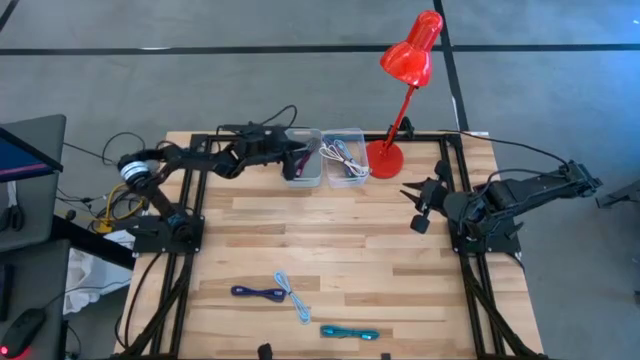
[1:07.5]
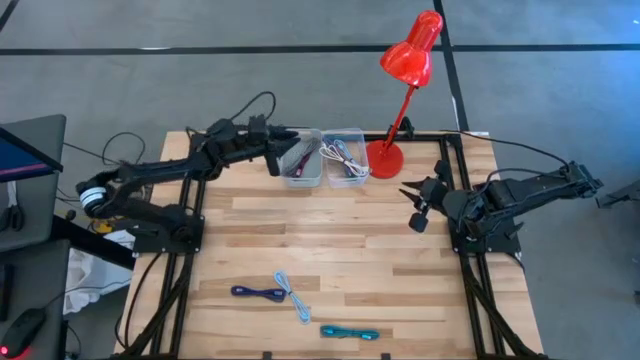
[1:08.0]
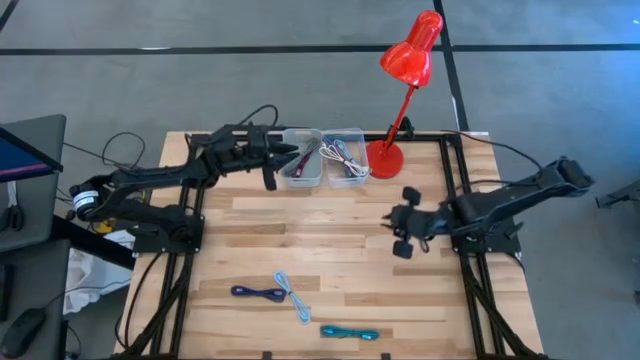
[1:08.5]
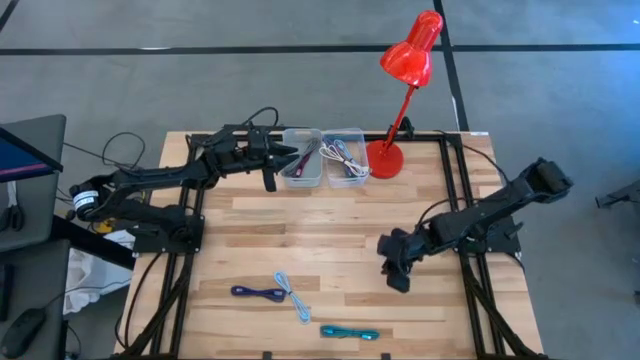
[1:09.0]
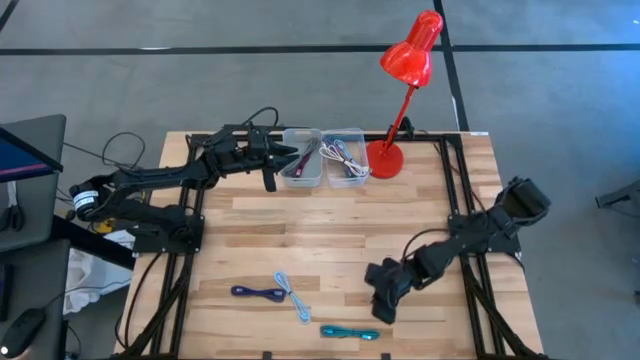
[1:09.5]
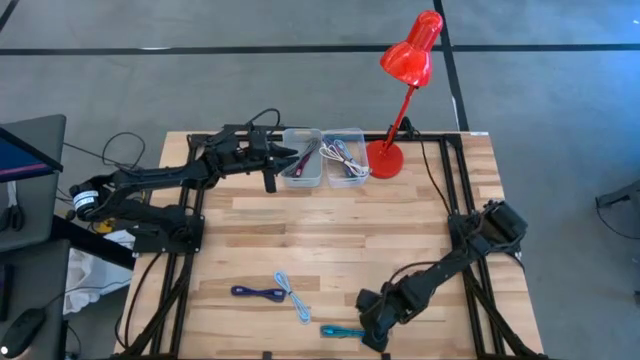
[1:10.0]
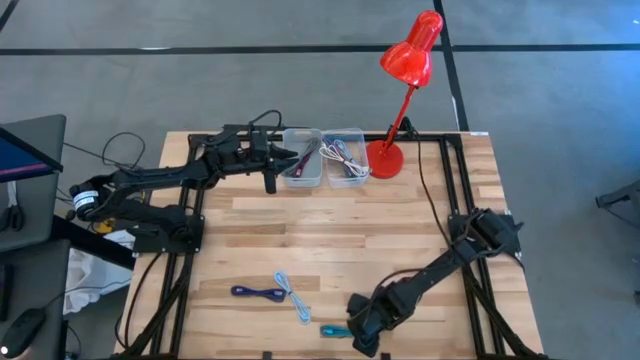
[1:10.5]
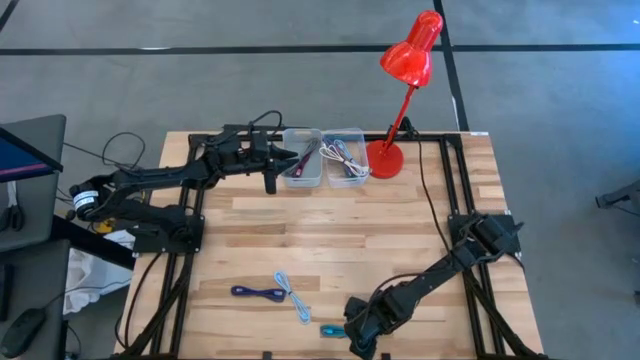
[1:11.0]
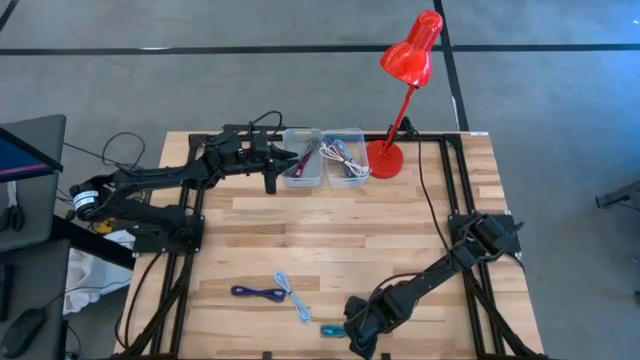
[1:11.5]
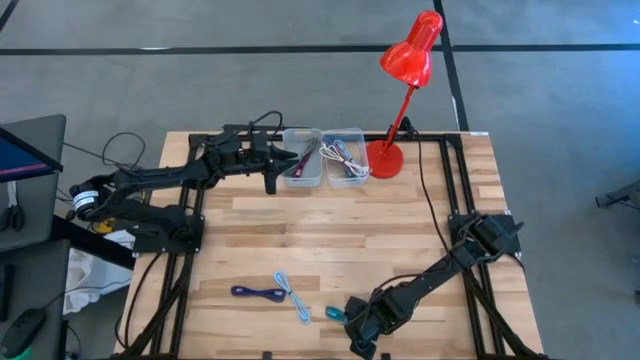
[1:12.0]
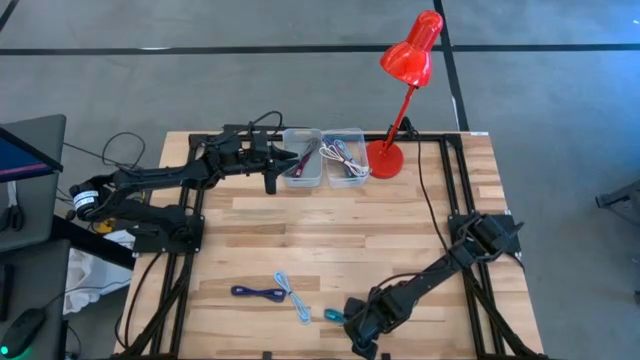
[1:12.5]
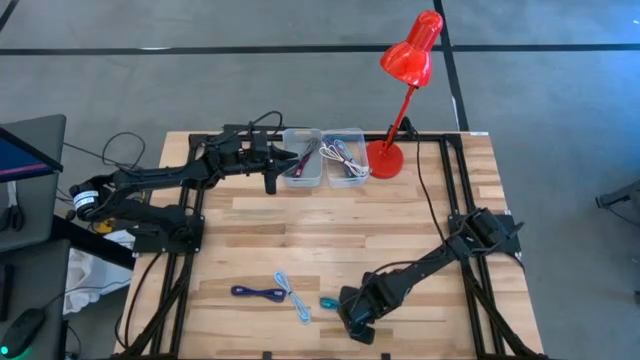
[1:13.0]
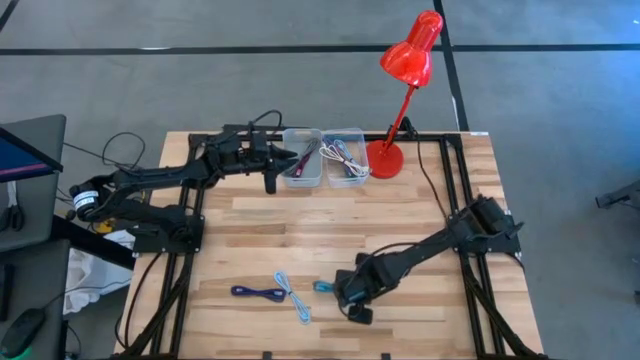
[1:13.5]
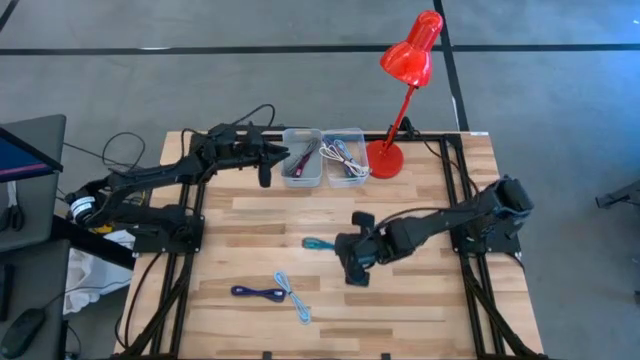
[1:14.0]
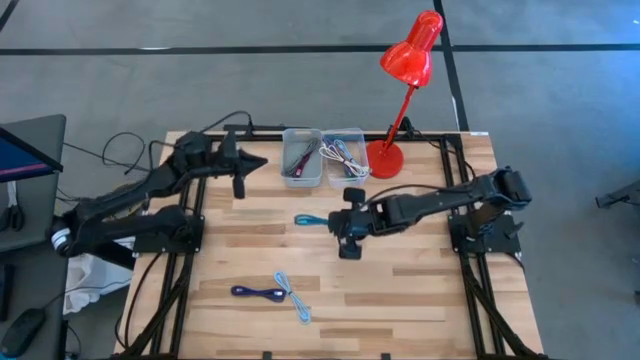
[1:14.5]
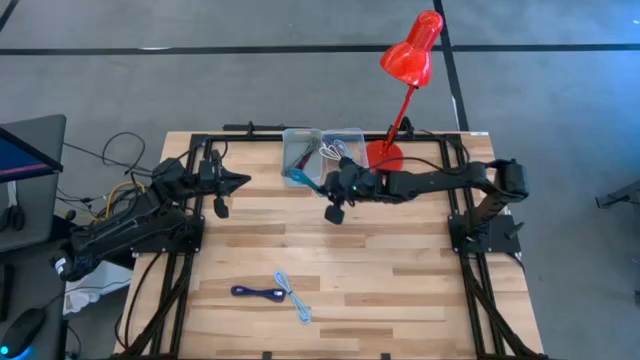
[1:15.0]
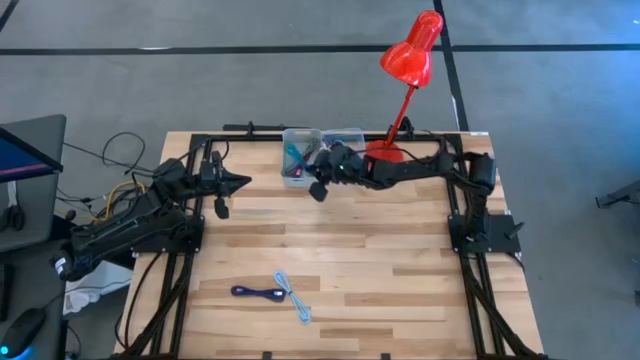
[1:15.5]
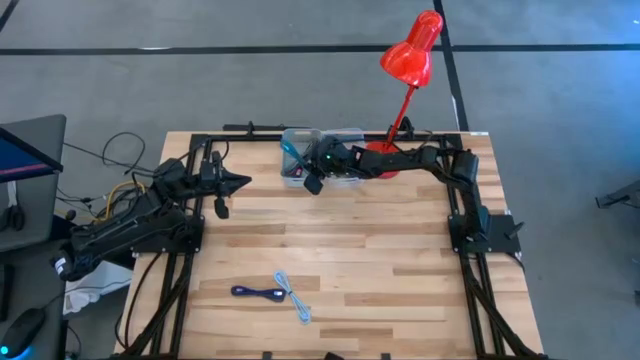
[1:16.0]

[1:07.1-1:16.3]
Task: Pick & Place USB Port
Put the black and blue charger cable into the gray bin

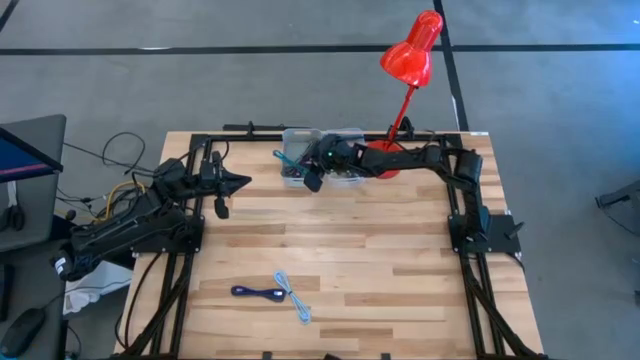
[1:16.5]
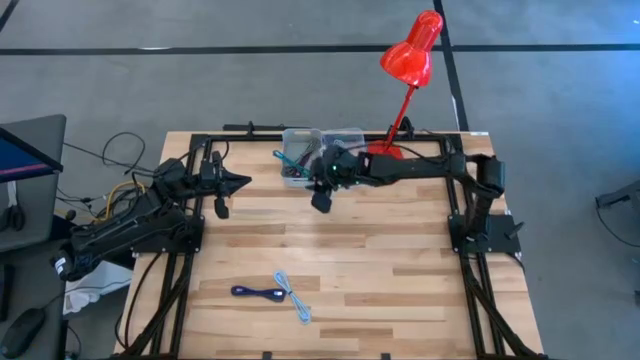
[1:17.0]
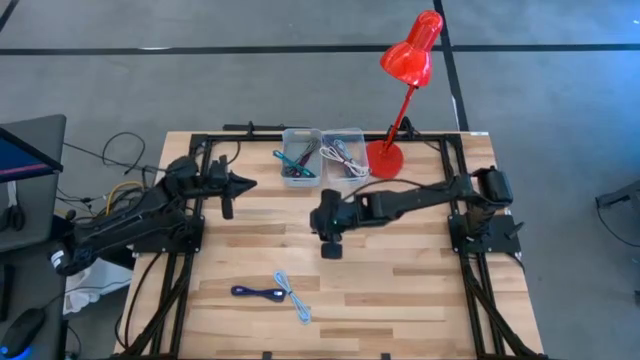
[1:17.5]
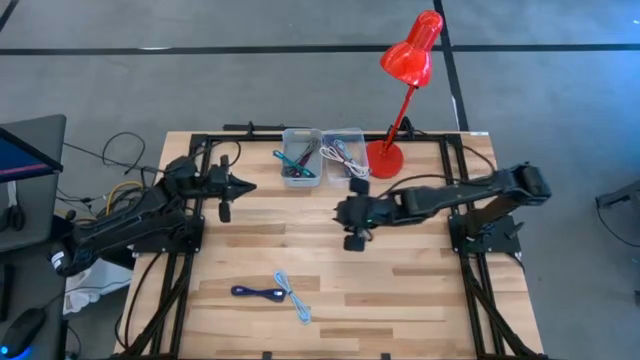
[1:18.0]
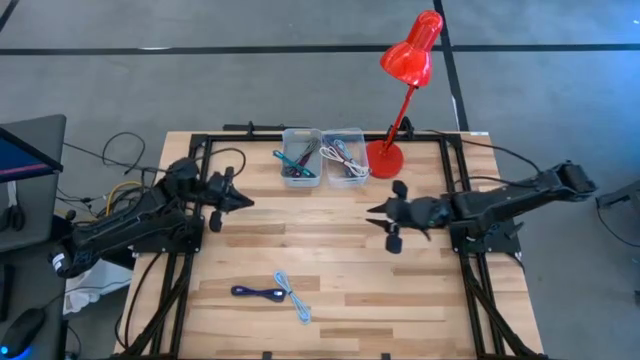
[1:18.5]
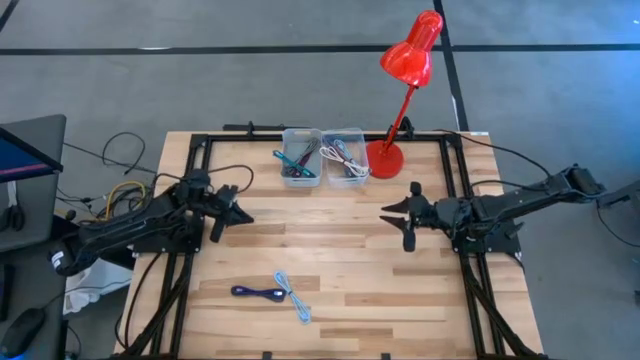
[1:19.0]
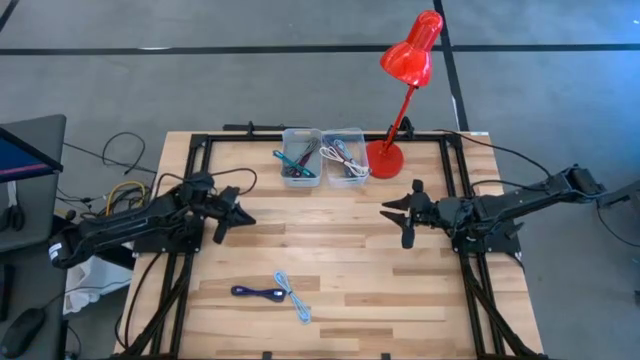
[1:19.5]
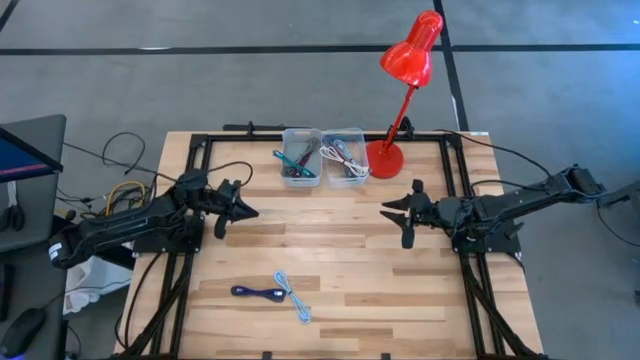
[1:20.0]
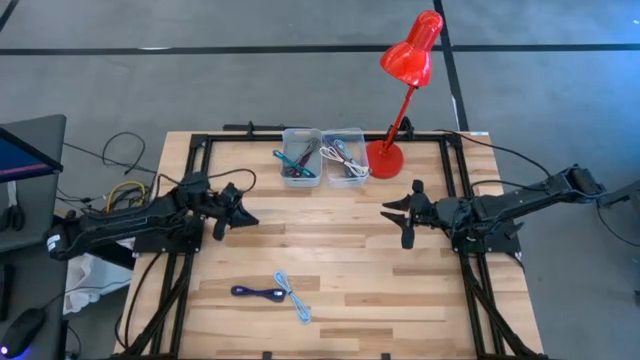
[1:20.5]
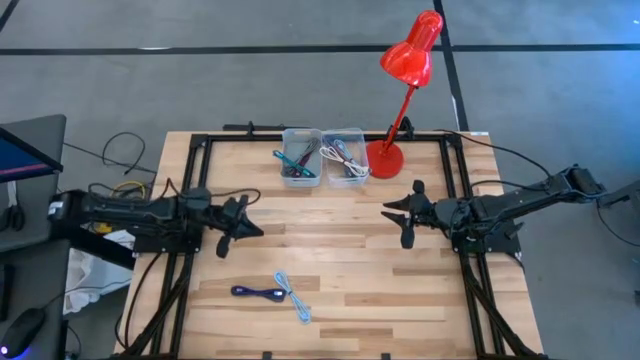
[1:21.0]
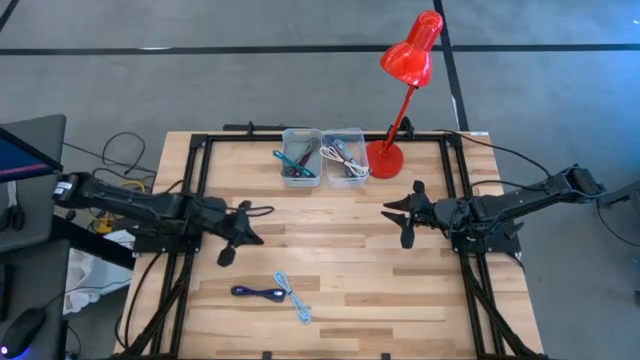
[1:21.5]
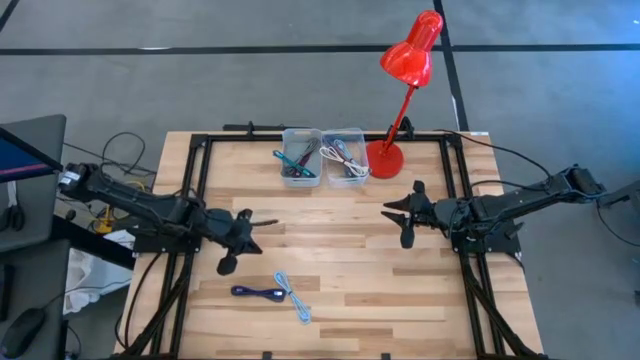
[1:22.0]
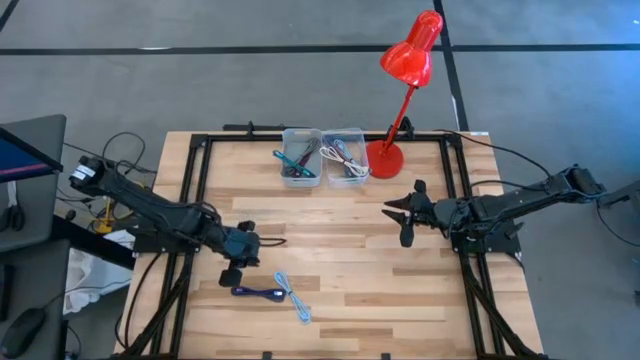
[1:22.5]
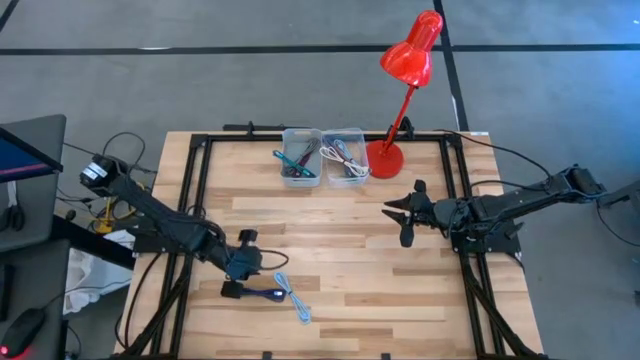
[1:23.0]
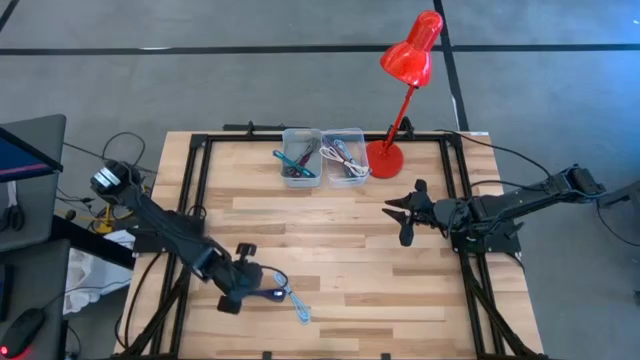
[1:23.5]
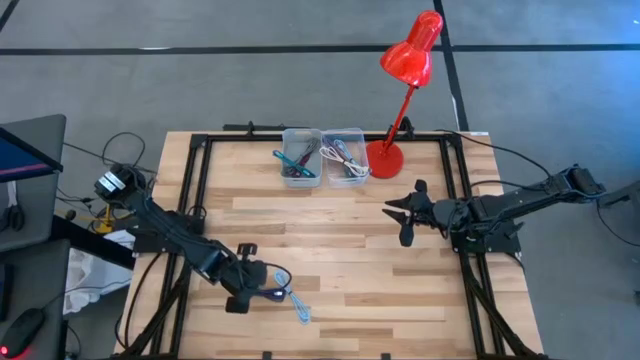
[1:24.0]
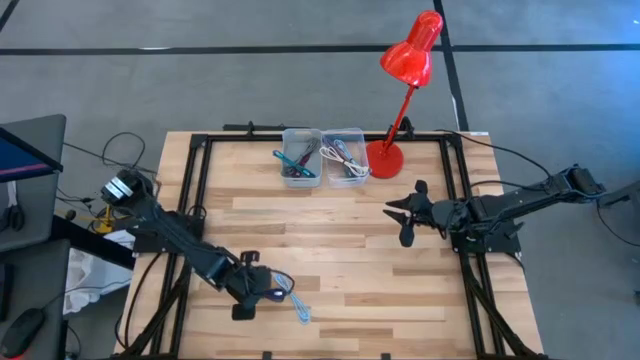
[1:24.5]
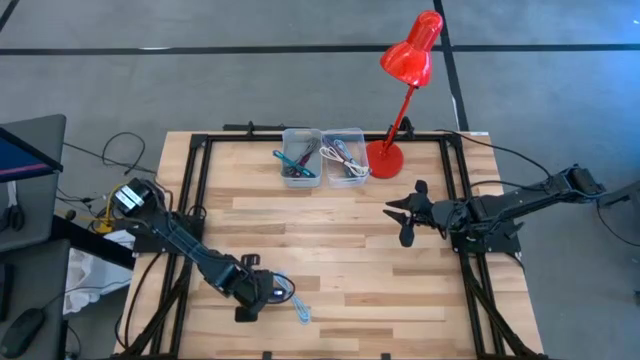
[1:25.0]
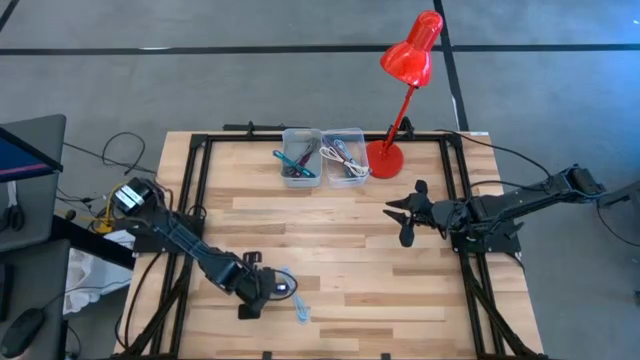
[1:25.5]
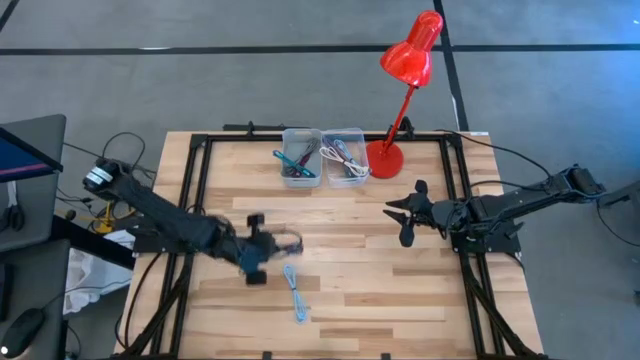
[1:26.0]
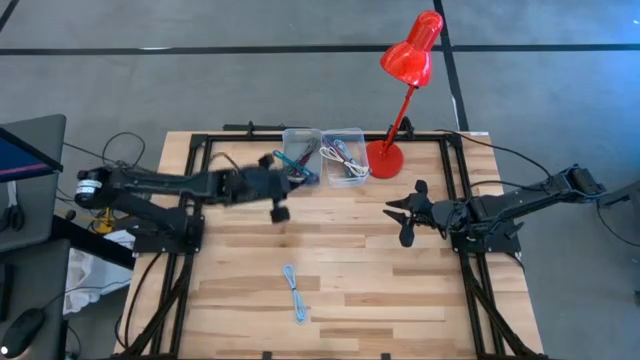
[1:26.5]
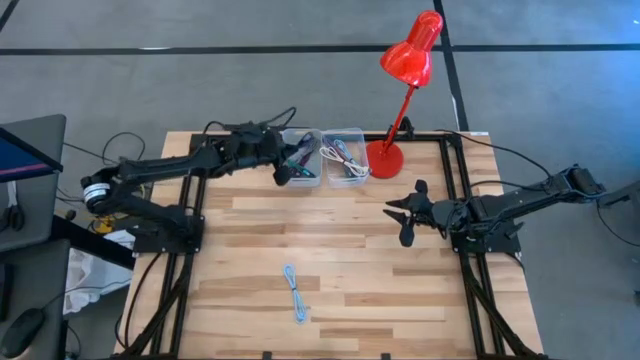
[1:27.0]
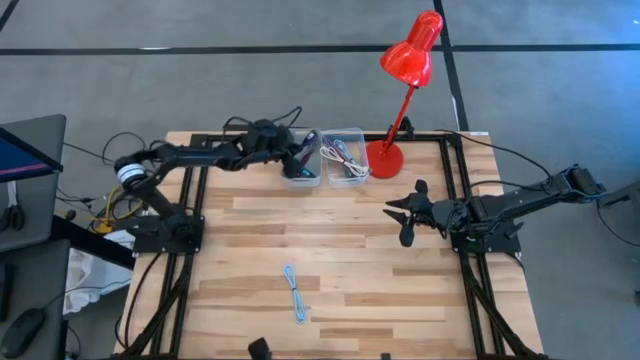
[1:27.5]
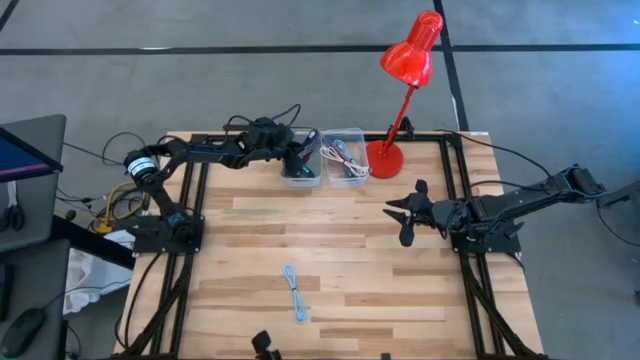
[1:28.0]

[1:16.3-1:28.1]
Put the purple and black charger cable into the gray bin
